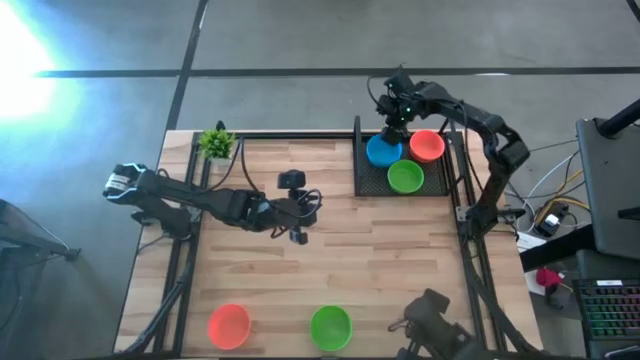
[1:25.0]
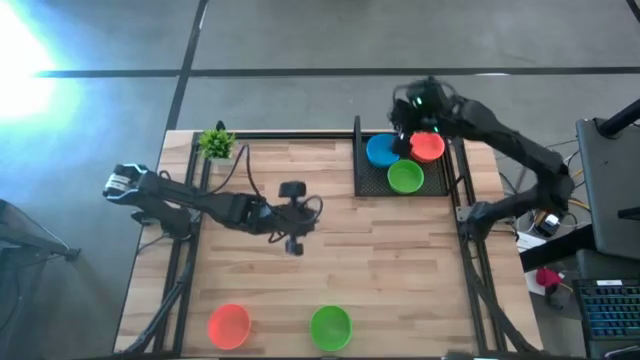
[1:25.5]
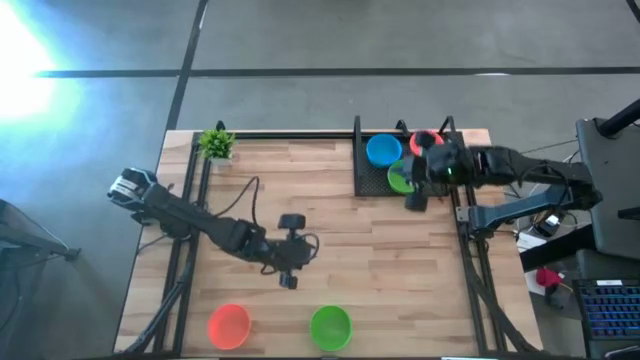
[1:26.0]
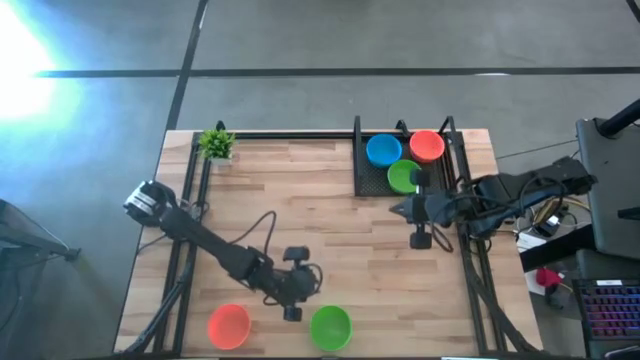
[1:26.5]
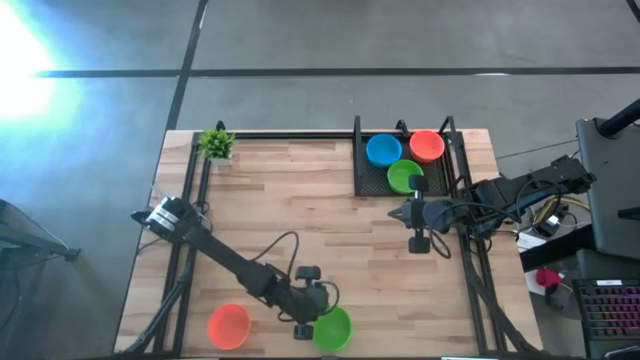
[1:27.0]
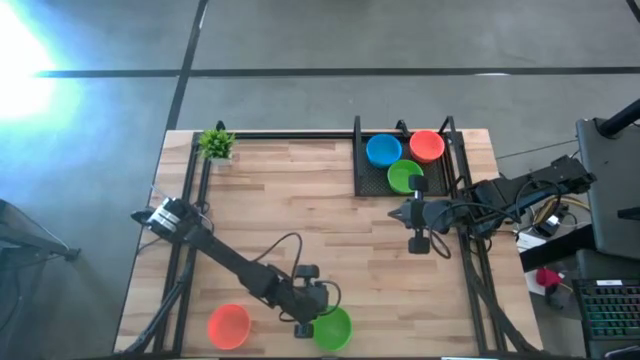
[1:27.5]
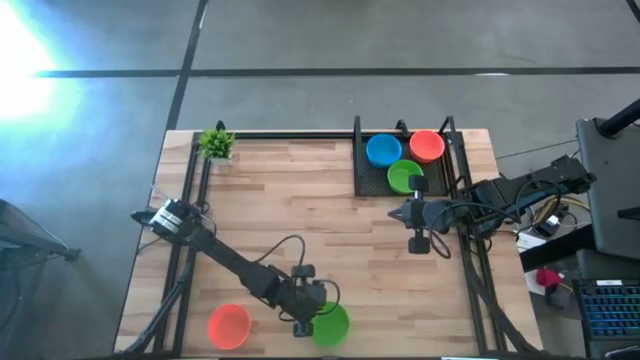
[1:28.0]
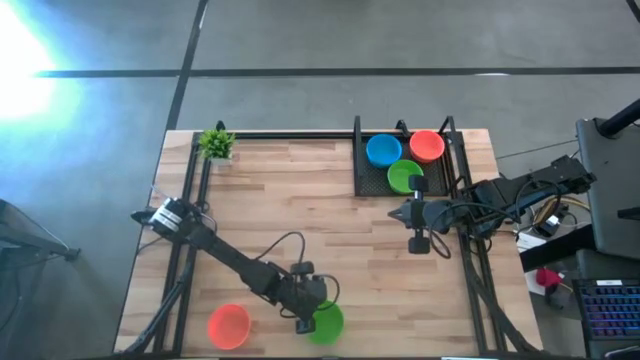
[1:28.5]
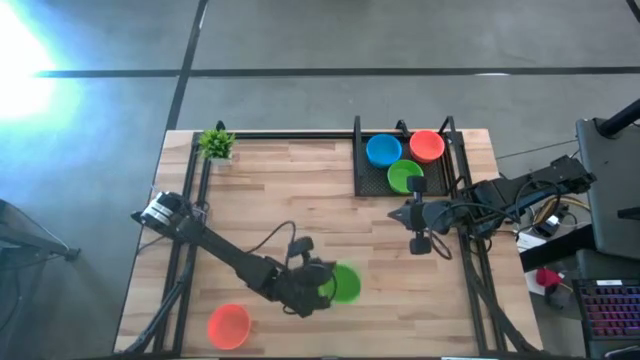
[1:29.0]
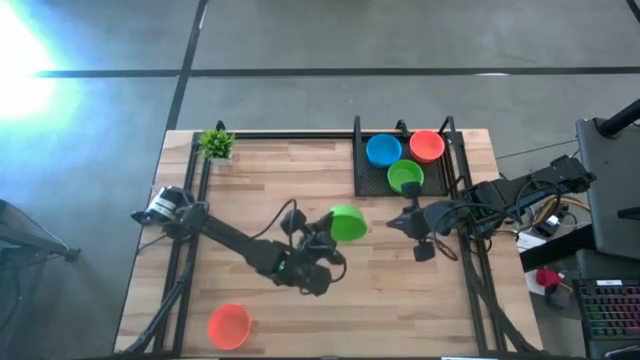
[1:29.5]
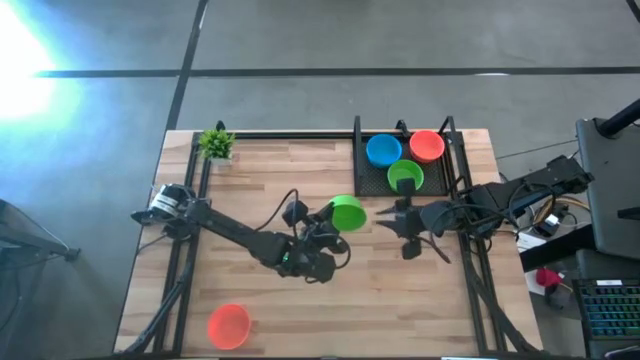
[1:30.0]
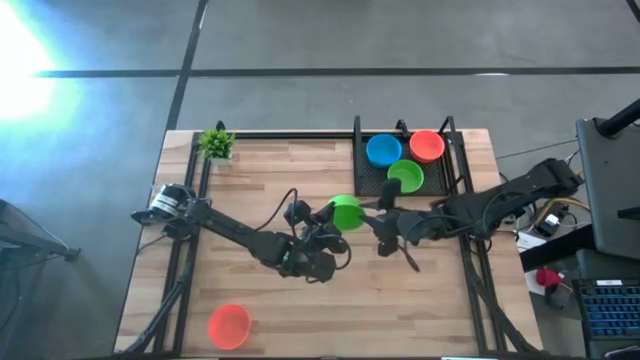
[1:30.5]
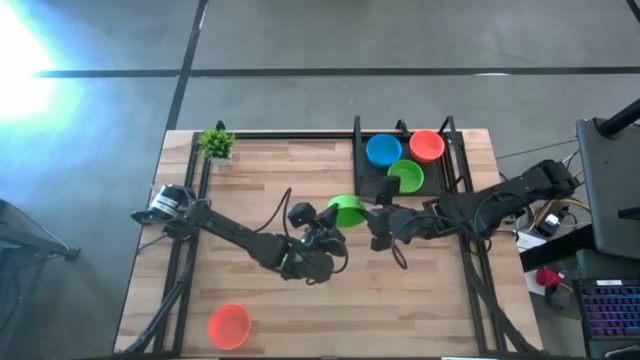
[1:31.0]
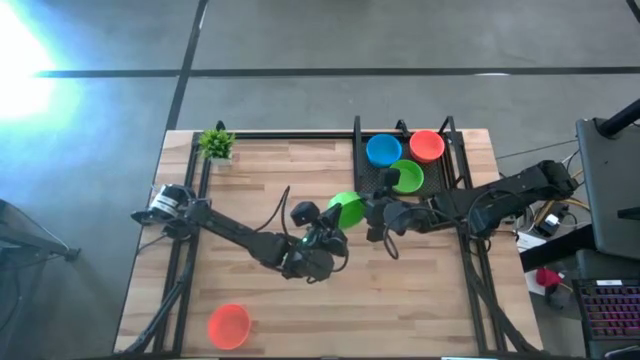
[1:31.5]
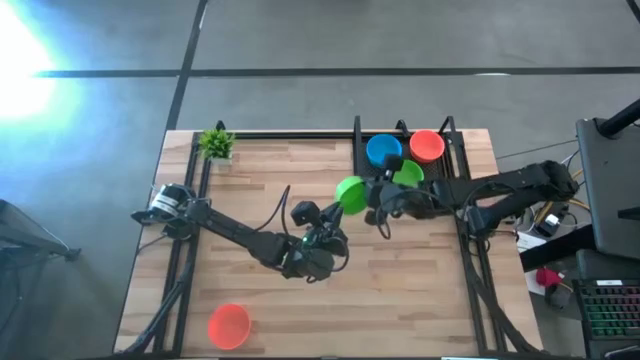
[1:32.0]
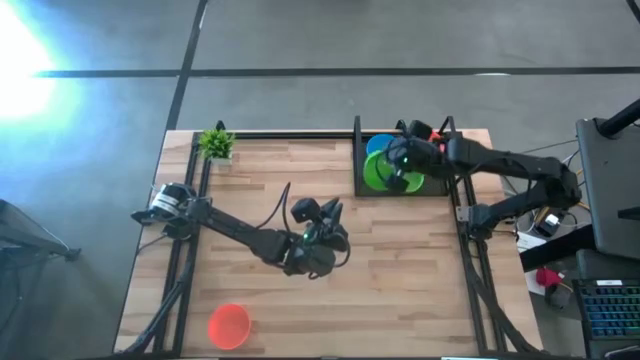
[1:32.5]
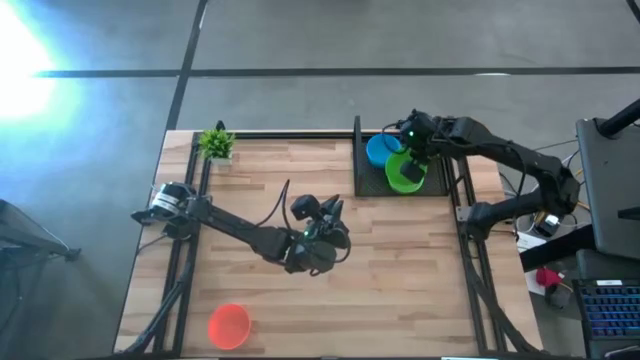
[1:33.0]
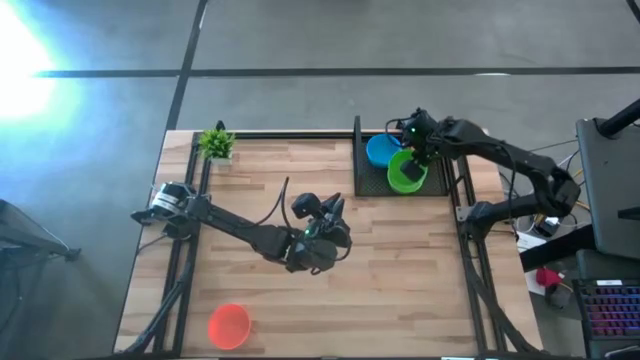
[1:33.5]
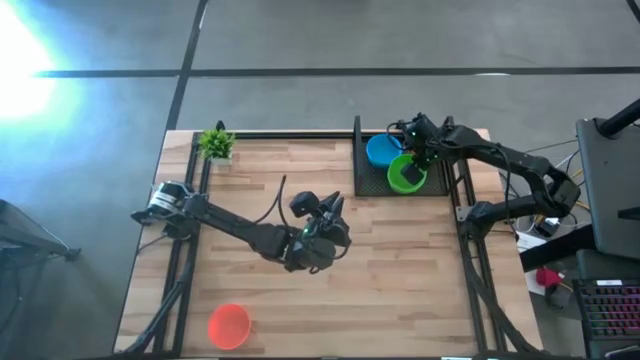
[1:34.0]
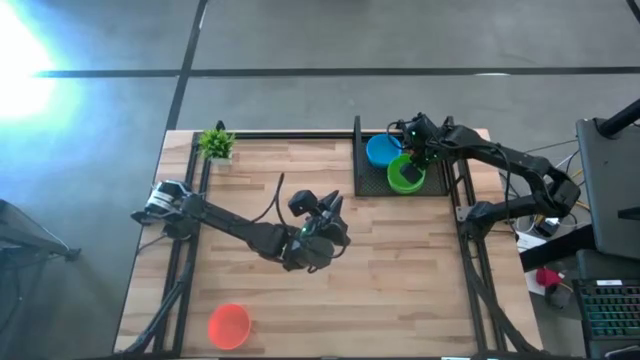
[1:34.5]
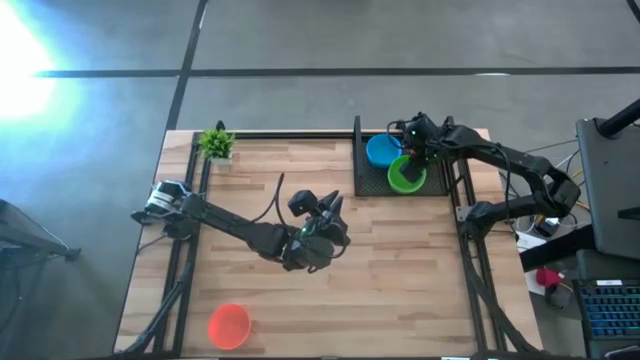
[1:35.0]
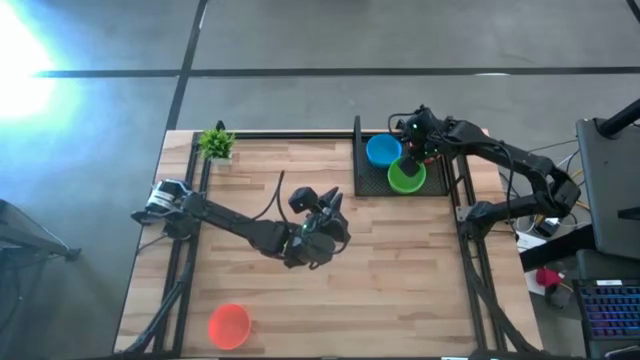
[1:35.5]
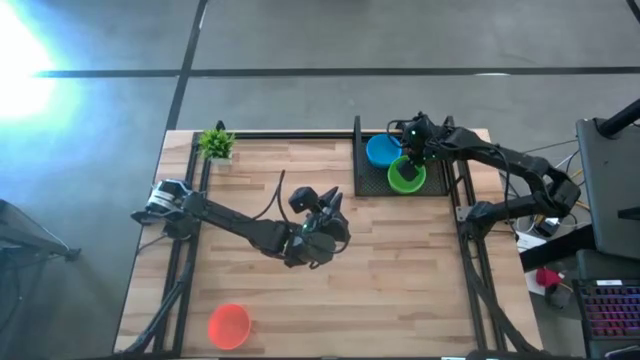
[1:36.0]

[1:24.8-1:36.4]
Task: Pick & Place Mini bowls
Stack the green bowl on top of the green bowls on the shelf

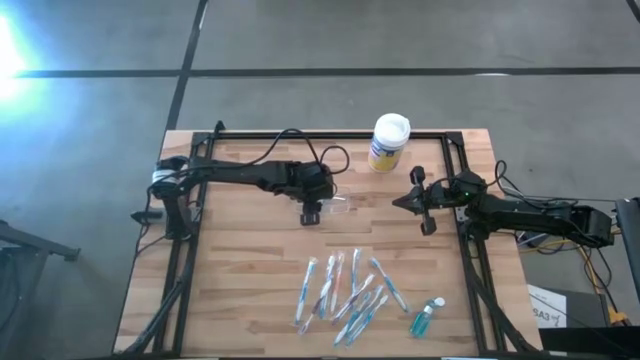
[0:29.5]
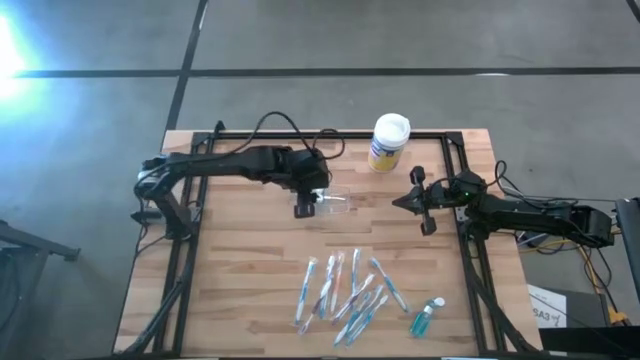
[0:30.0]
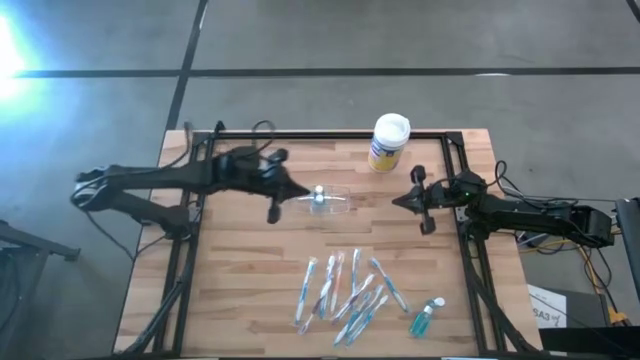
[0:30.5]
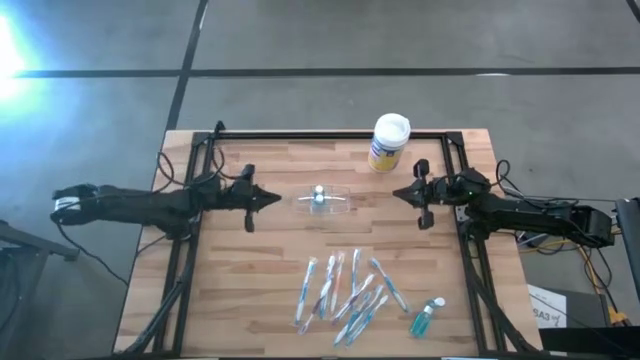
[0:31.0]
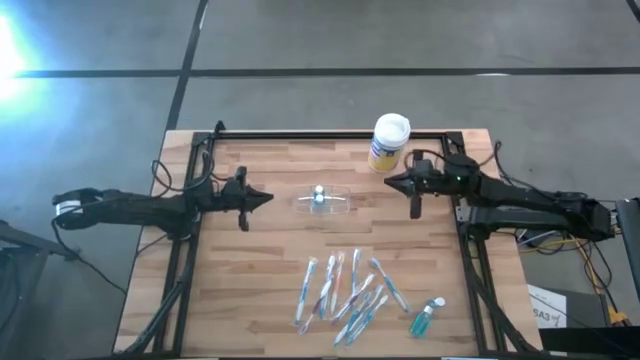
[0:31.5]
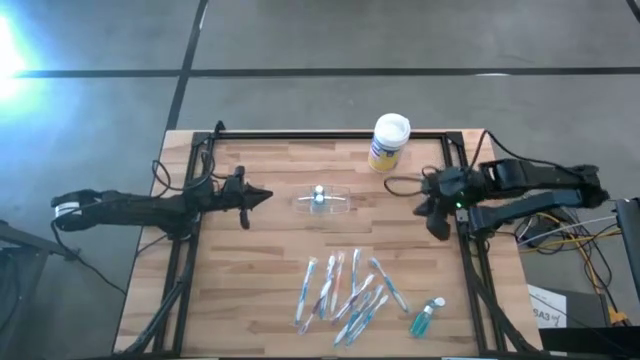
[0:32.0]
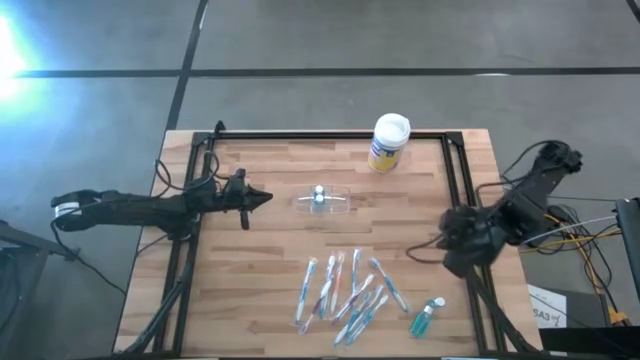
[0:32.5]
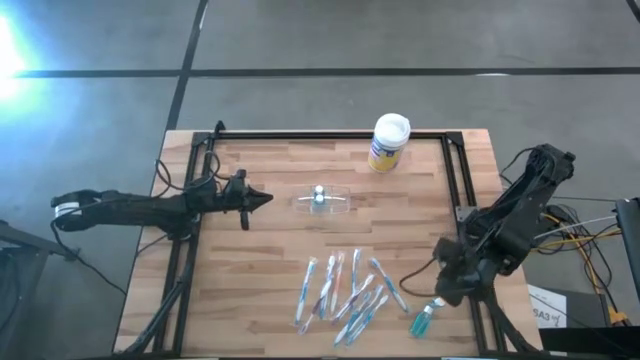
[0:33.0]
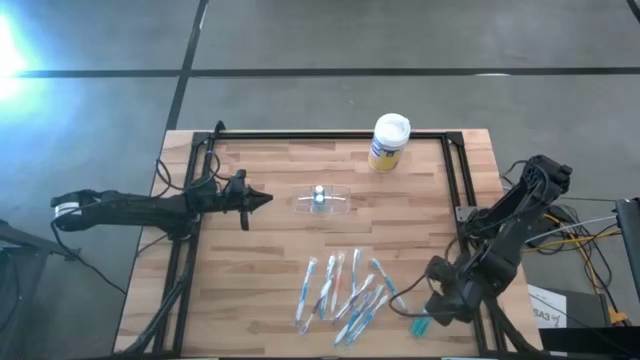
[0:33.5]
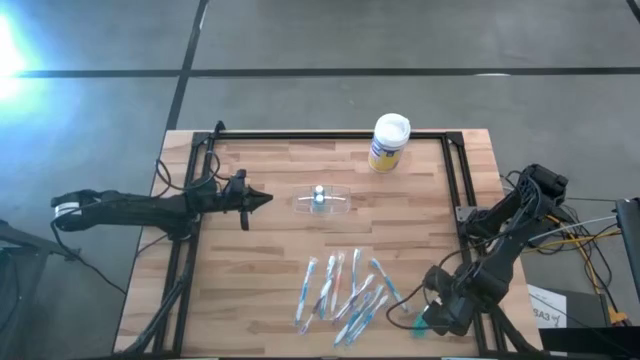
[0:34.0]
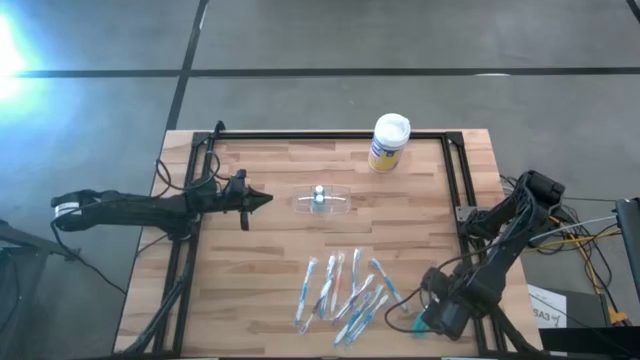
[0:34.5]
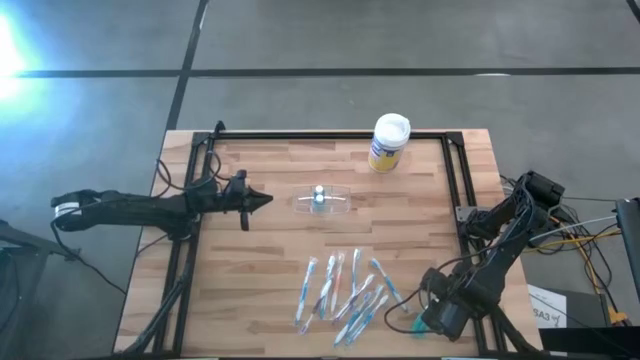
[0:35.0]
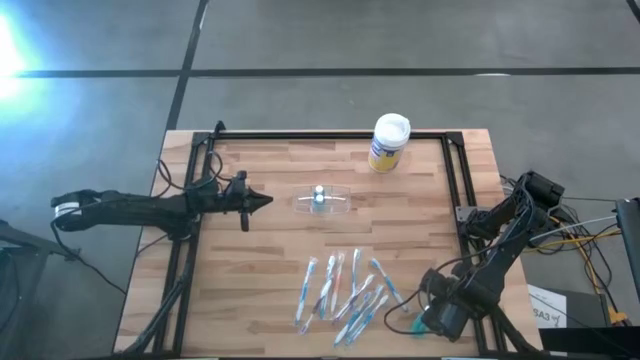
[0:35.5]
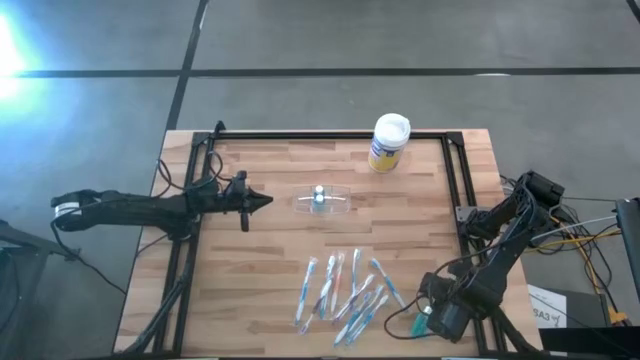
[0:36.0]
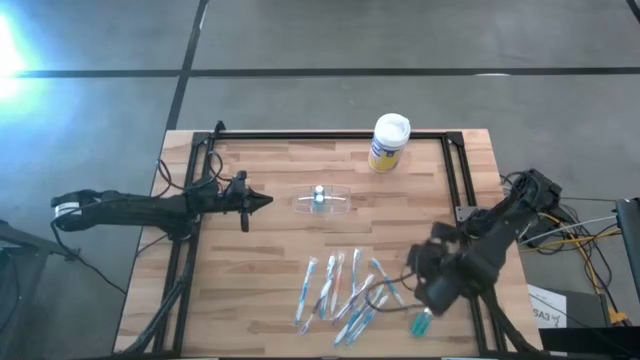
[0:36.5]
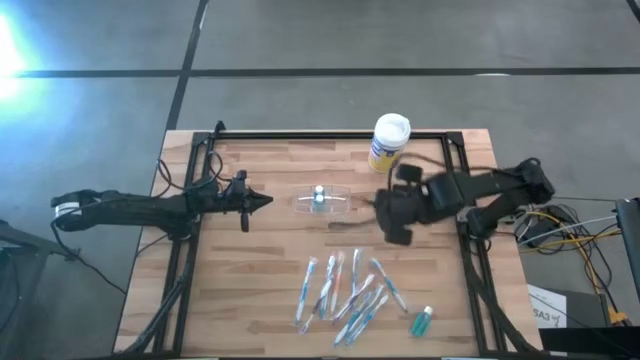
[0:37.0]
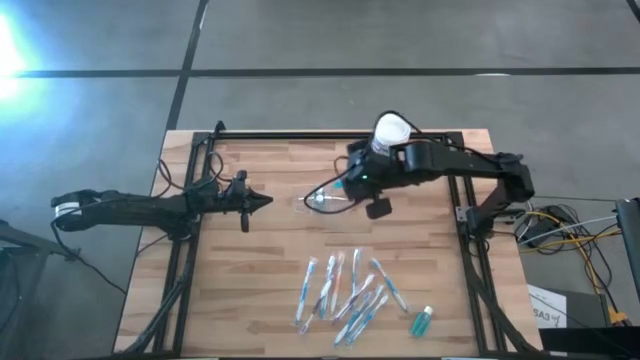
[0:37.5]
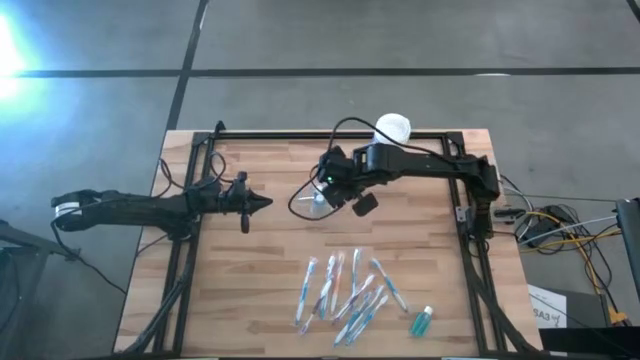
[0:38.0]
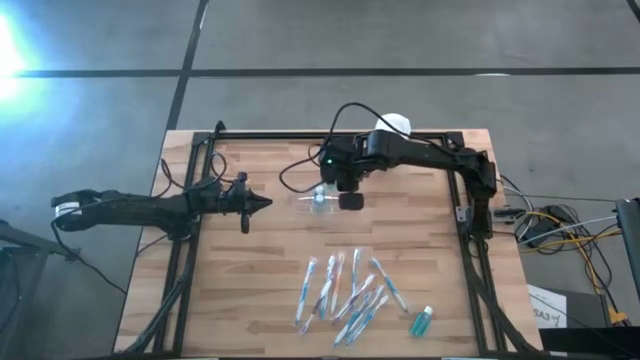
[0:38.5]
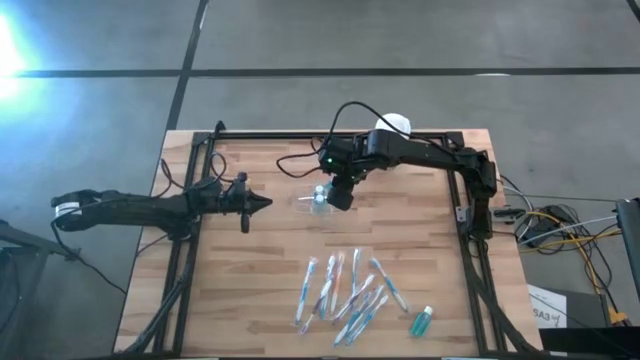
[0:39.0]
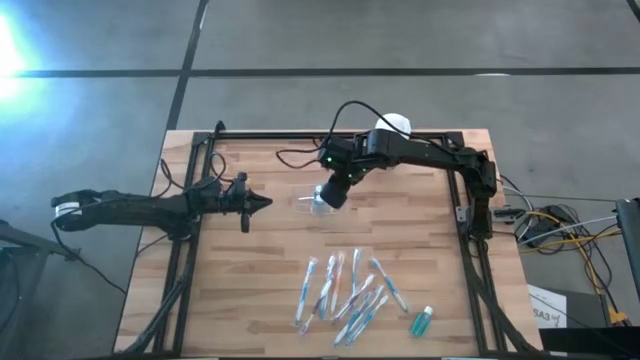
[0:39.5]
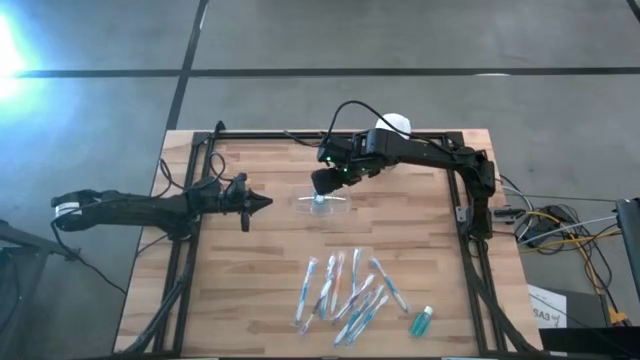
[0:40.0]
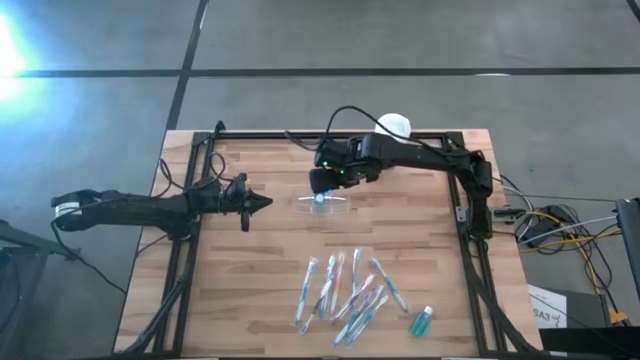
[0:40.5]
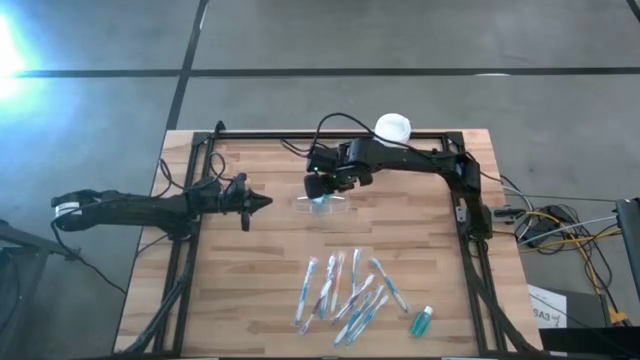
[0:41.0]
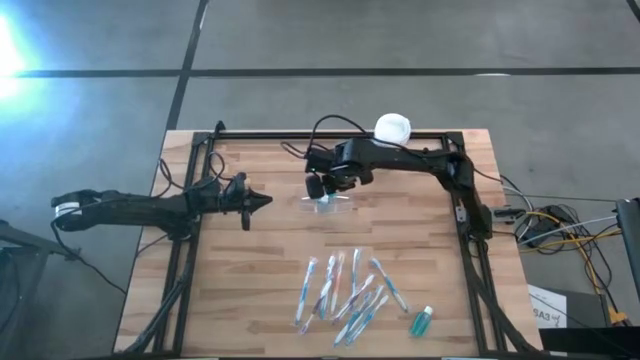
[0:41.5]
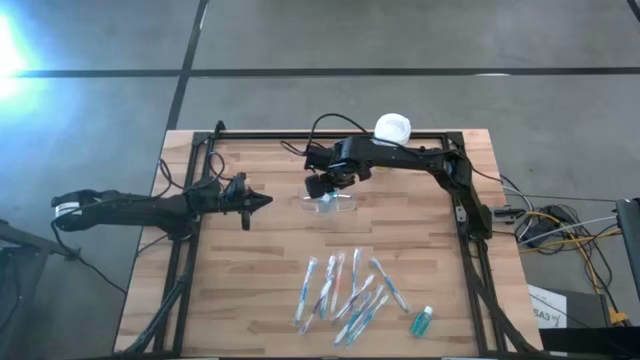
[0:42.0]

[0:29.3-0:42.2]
Task: Pick & Place toothbrushing station
Put the bottom right blue mouthwash into the transparent organizer
